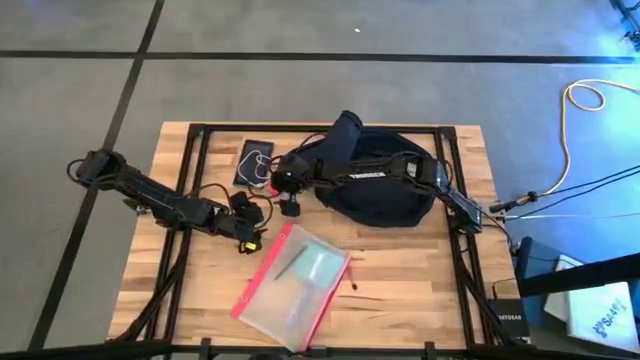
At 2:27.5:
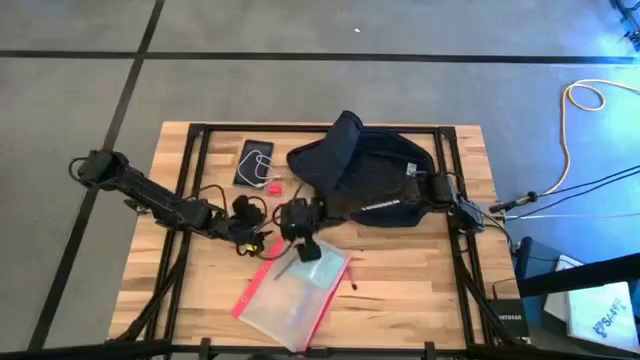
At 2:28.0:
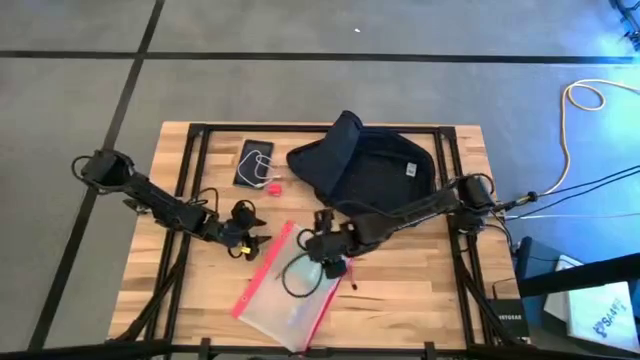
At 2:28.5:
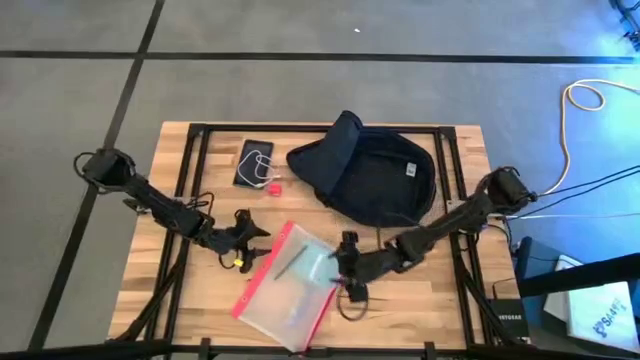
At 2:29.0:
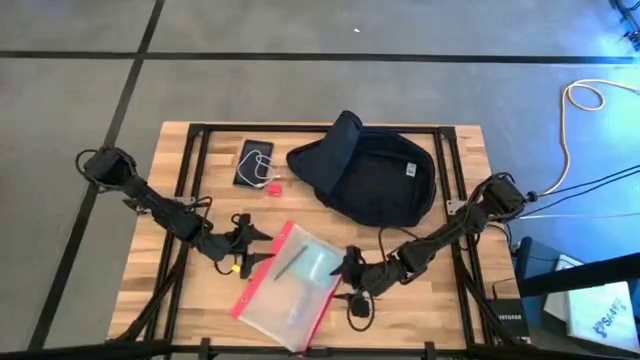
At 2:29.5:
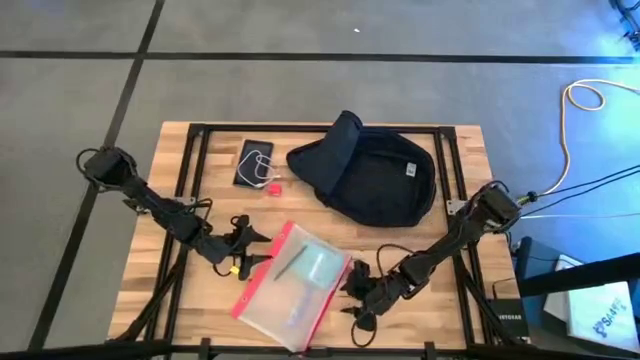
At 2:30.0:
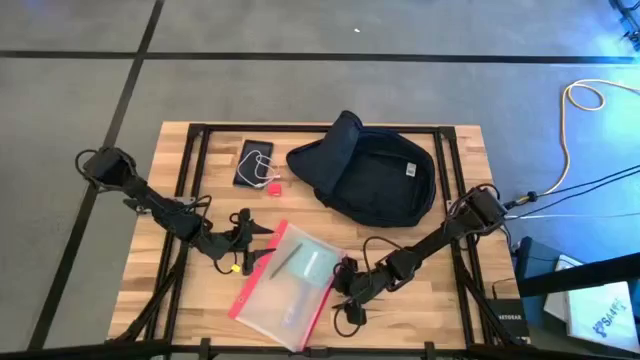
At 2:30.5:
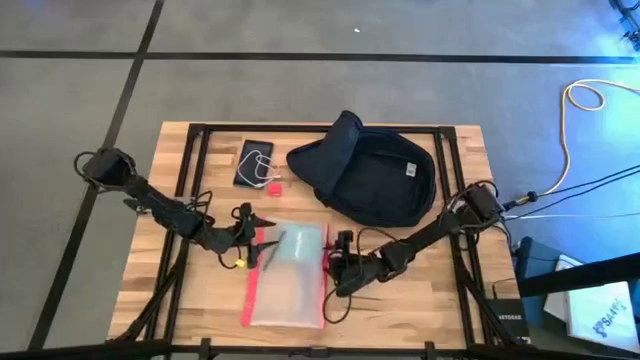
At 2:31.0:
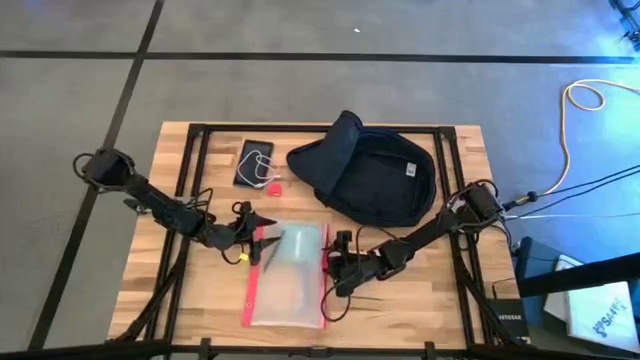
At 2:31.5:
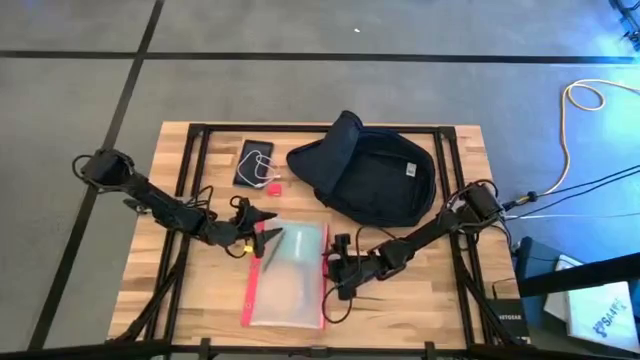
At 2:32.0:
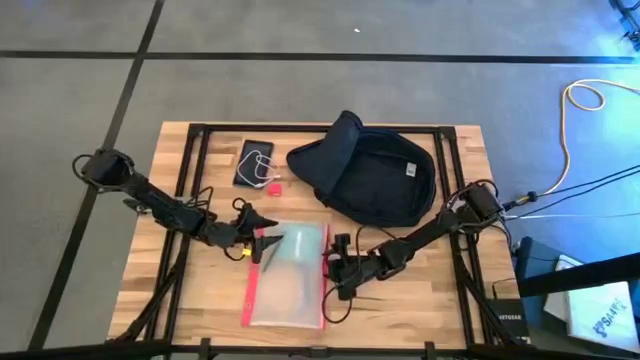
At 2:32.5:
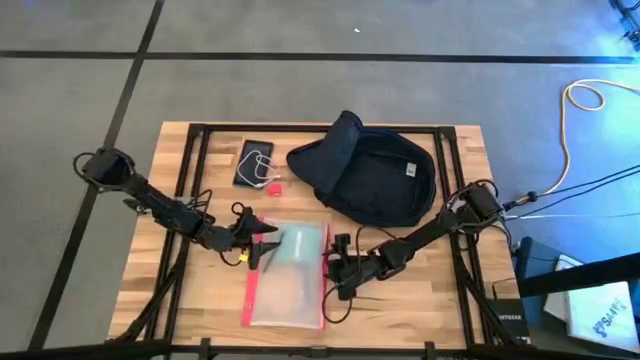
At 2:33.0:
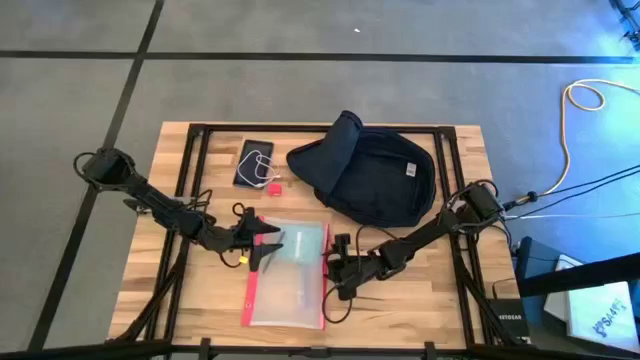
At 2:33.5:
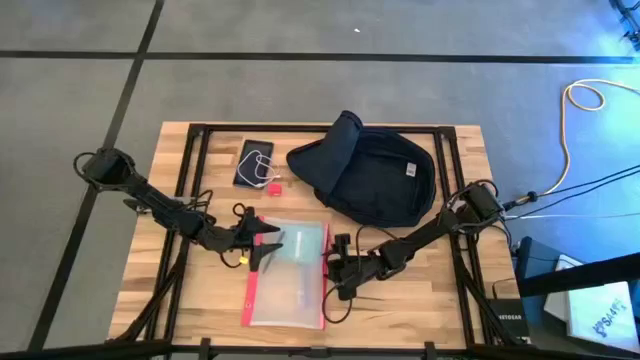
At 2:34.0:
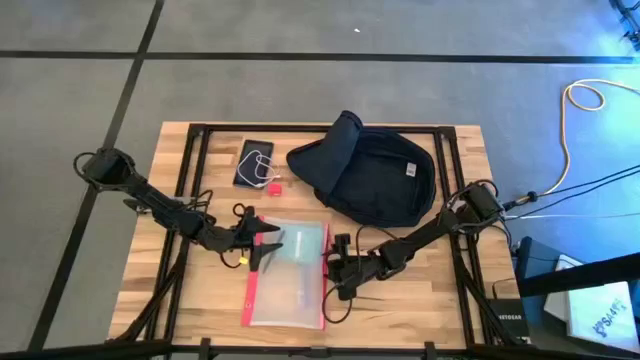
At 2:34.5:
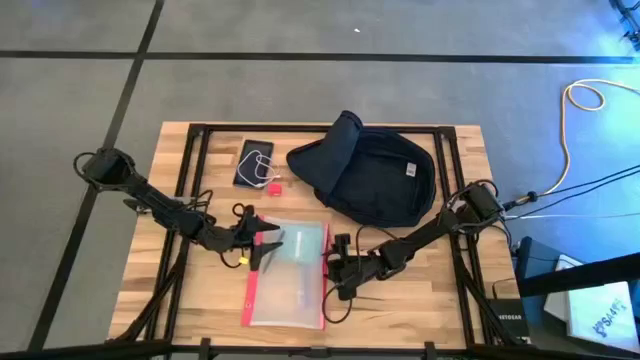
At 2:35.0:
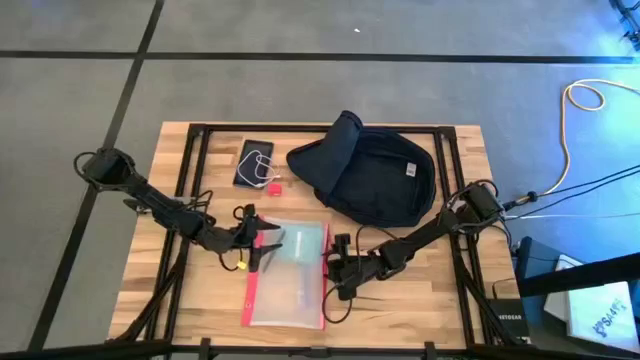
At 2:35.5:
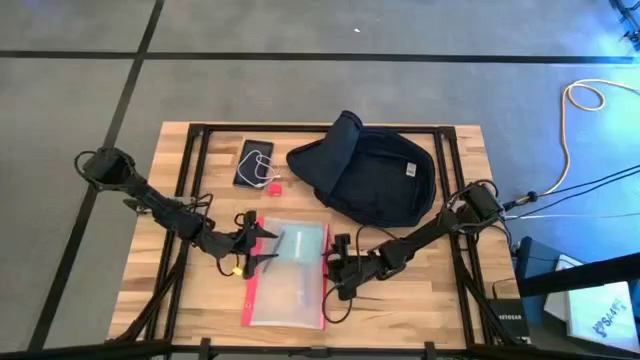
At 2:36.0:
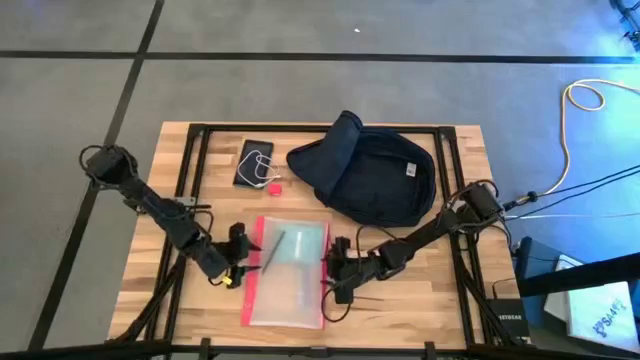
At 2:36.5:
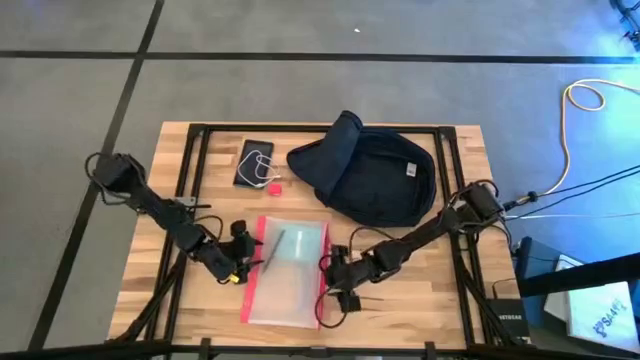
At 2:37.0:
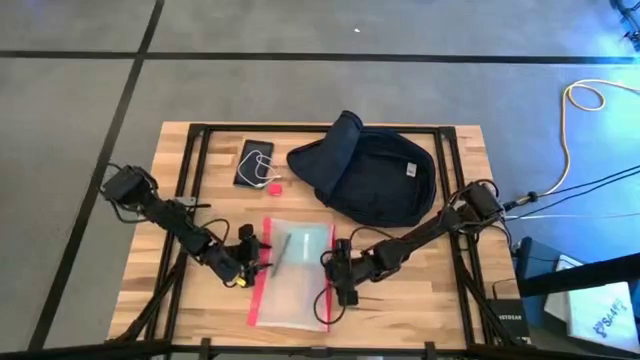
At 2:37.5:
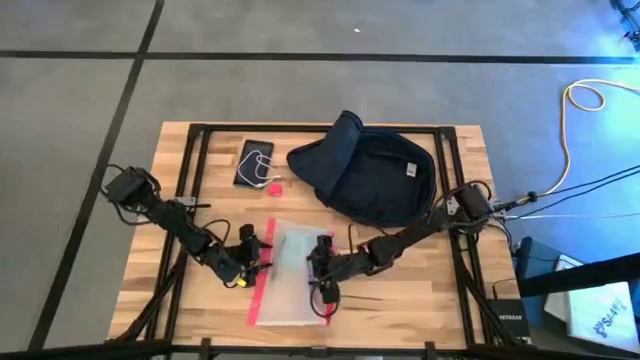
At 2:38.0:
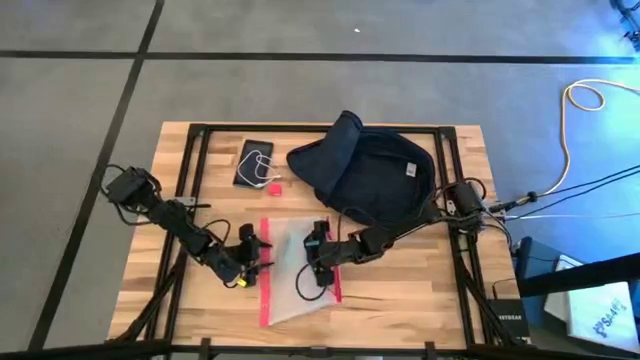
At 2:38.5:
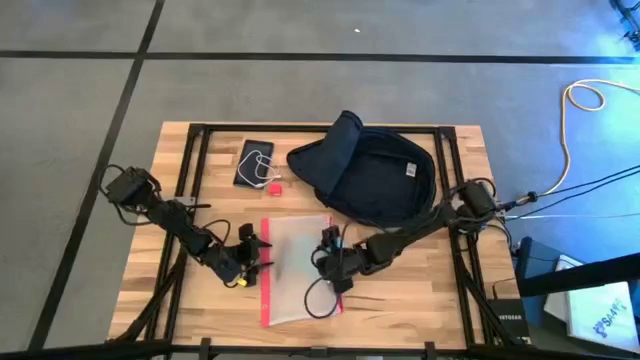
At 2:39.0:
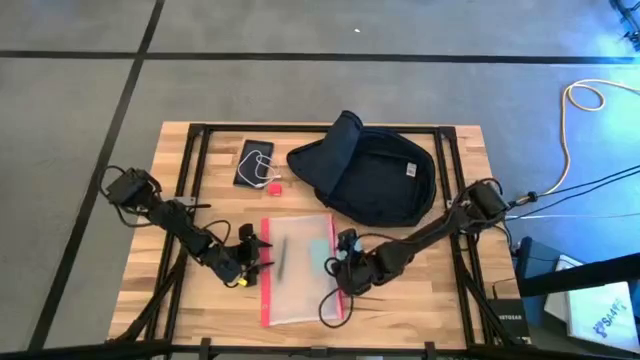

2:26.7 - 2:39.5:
Task: Unpack backpack
Remove the blue calculator from the transparent zip bag

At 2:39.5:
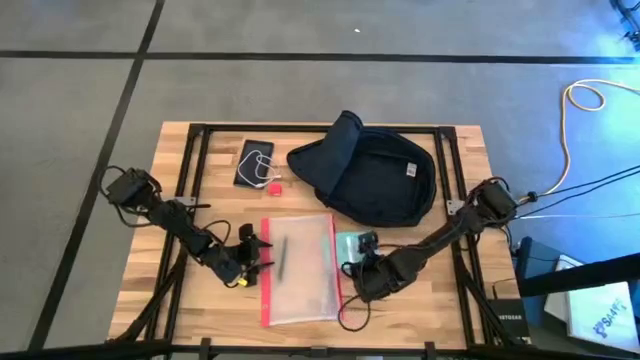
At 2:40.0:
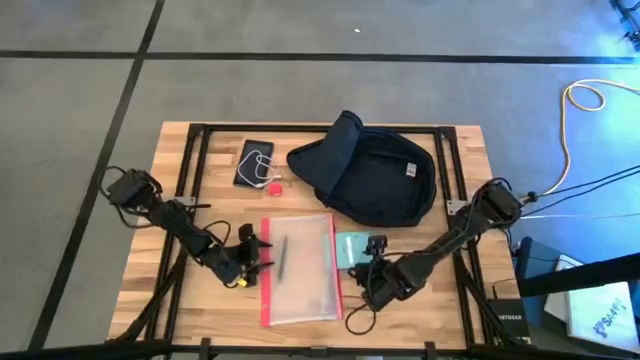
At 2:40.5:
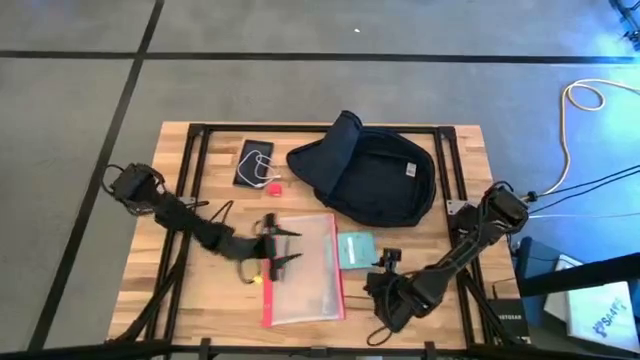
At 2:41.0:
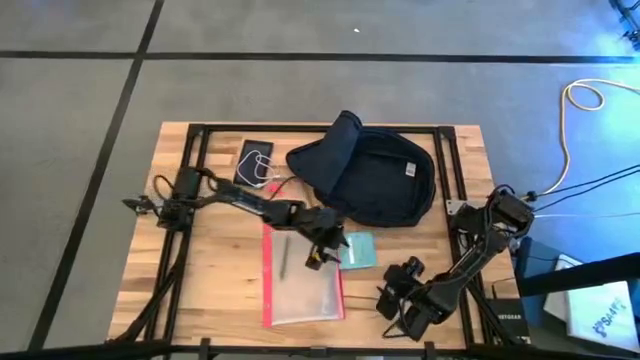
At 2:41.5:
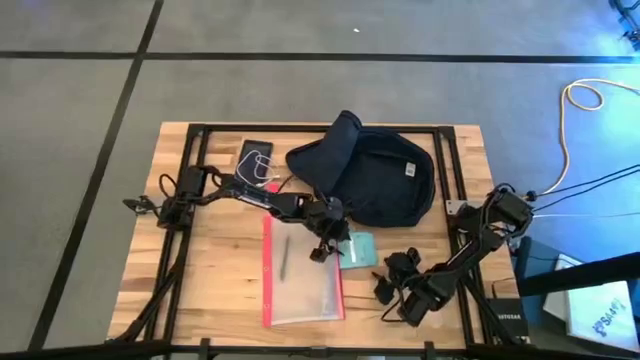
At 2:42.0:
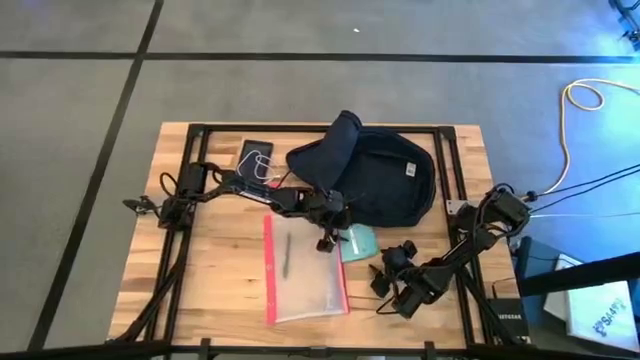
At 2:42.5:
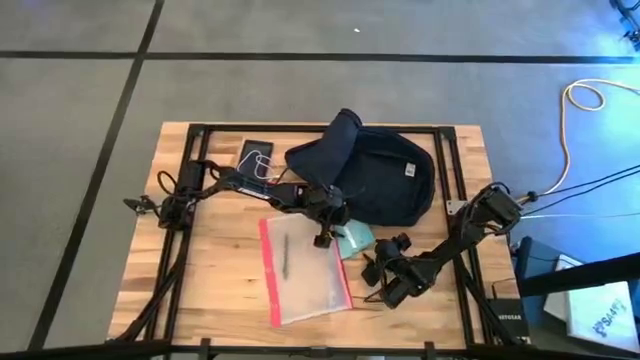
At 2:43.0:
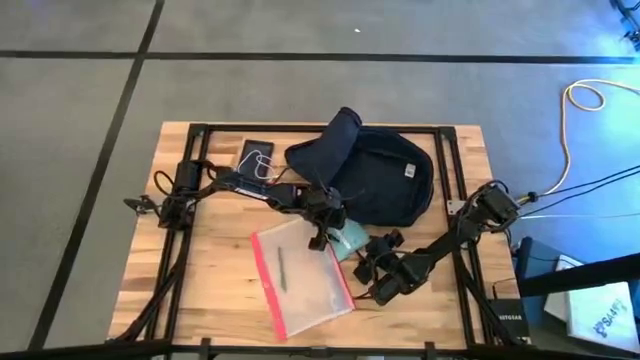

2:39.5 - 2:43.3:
Remove the blue calculator from the transparent zip bag

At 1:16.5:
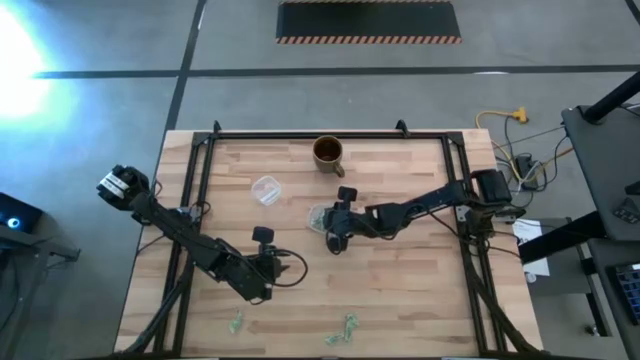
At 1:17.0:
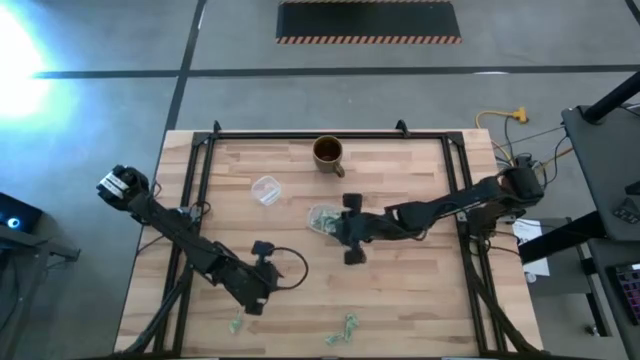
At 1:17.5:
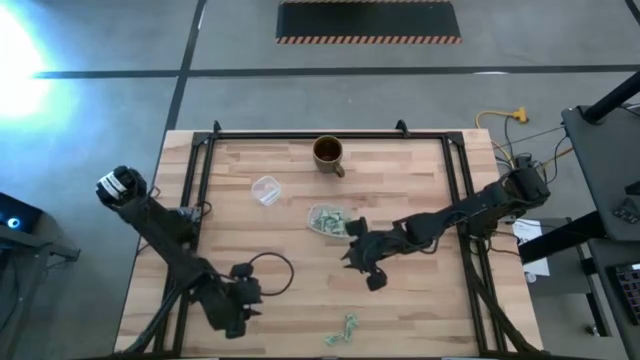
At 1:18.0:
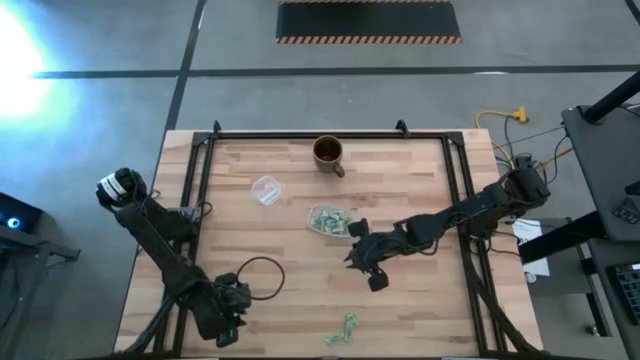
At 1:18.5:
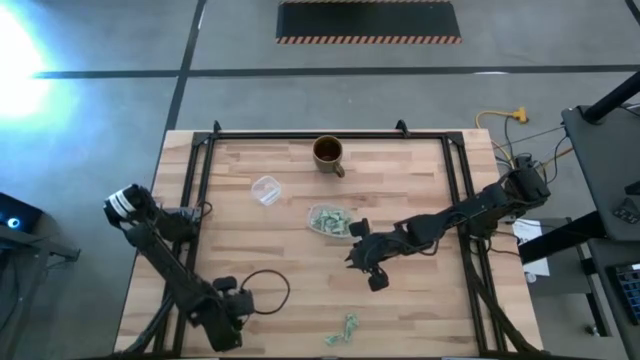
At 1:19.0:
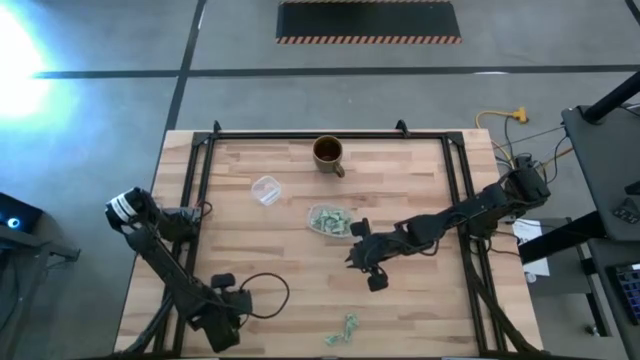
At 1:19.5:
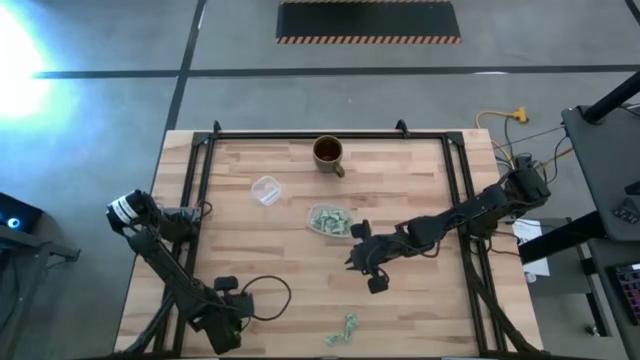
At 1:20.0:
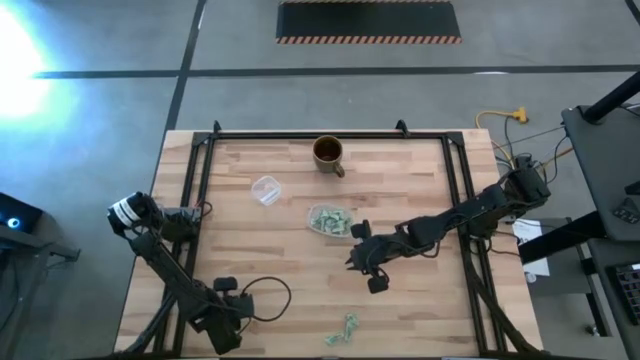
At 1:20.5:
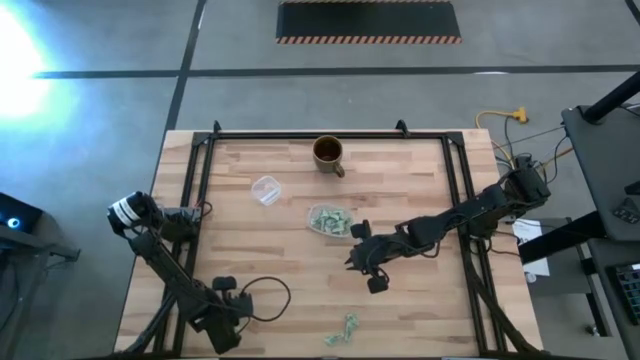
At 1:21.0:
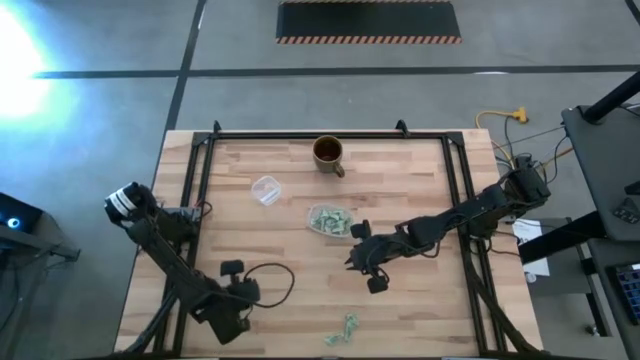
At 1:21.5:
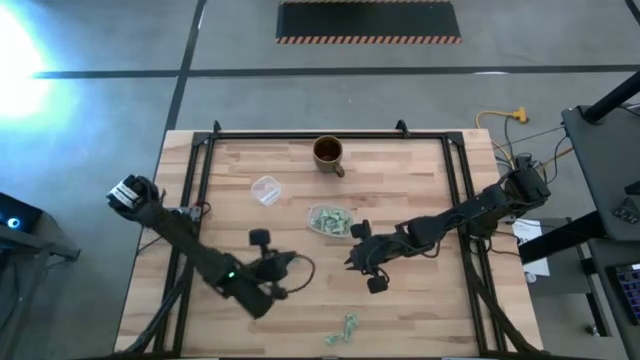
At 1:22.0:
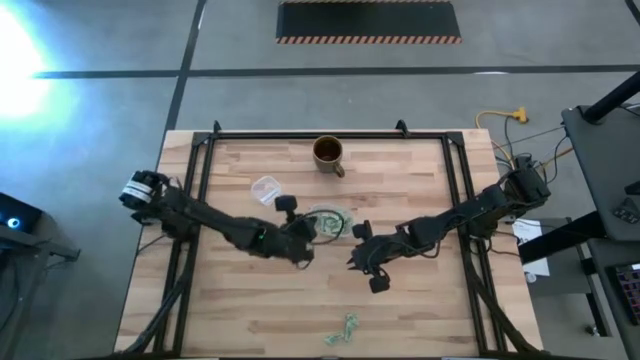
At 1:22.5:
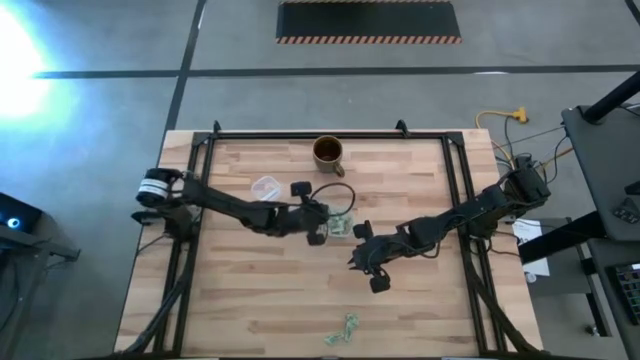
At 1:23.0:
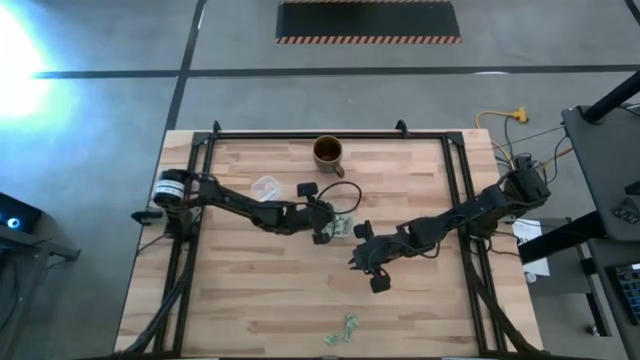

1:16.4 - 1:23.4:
Task: Pick and place Stevia / Truvia into bins
Put the green stevia packet into the transparent container
